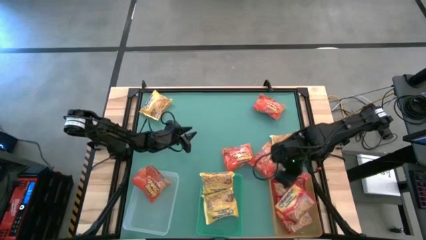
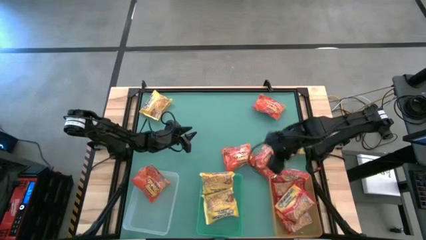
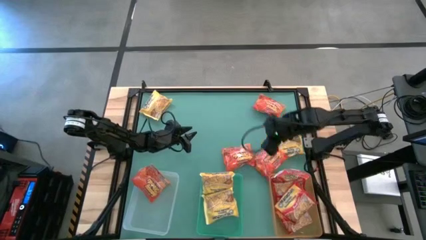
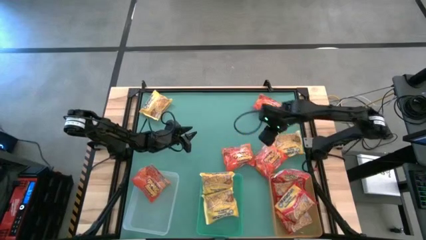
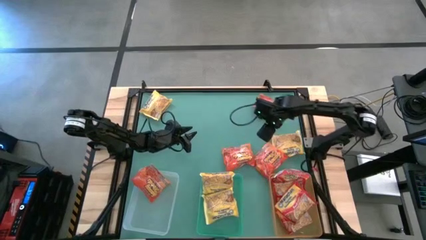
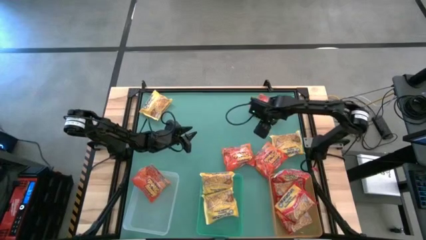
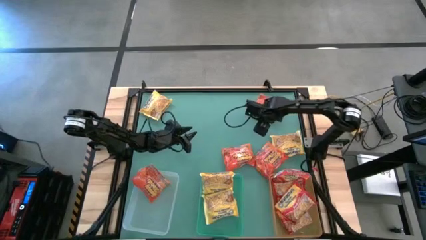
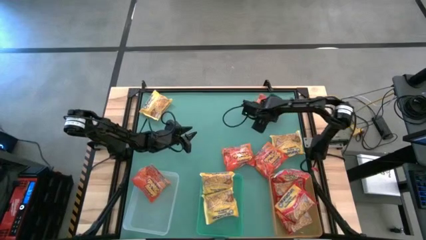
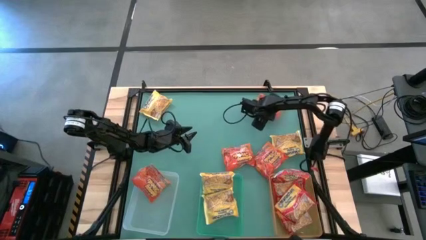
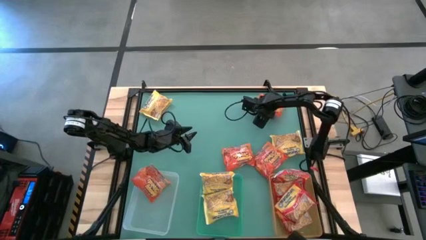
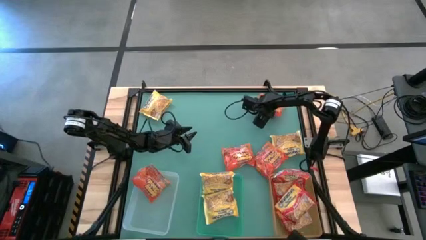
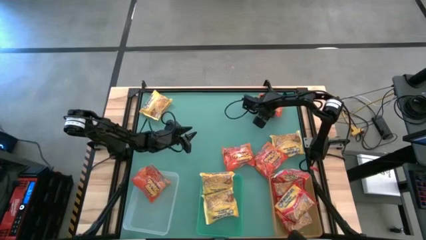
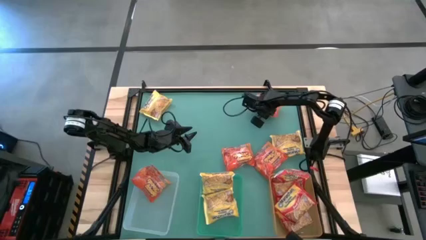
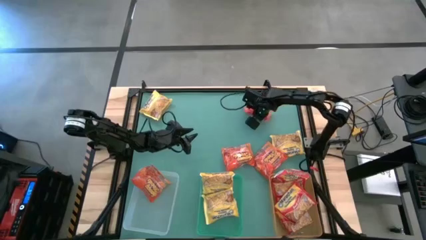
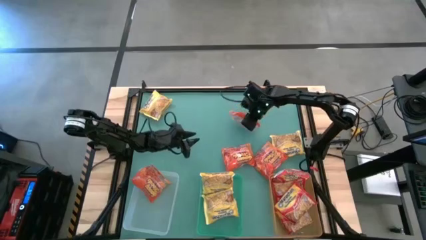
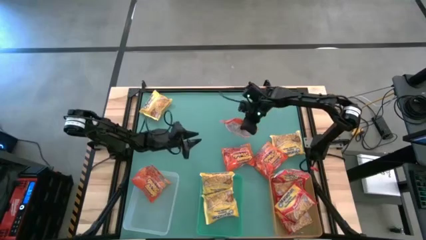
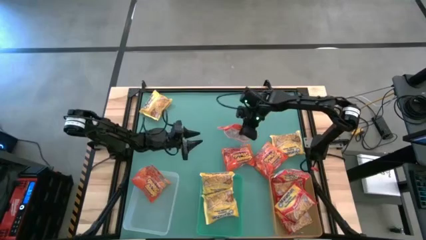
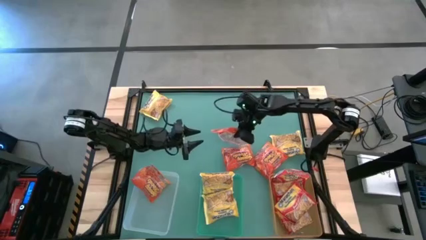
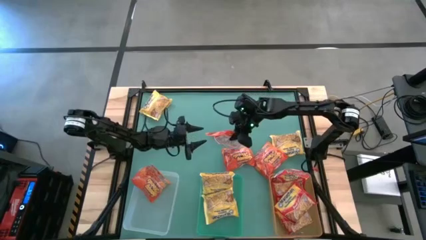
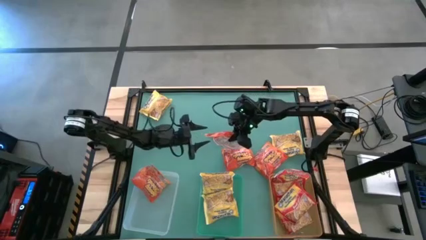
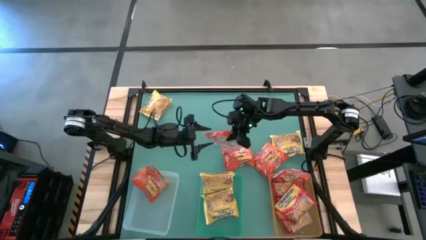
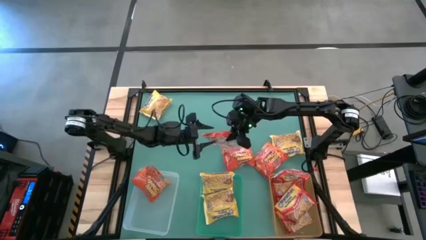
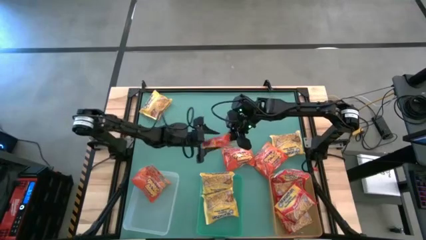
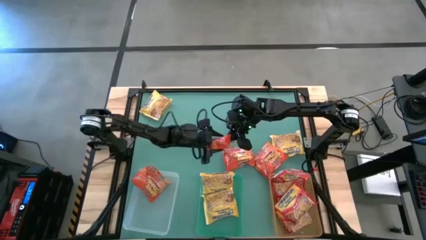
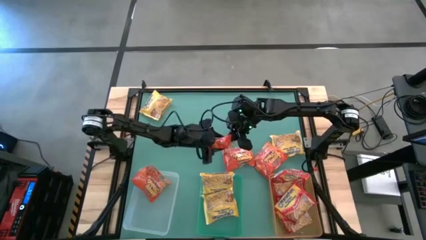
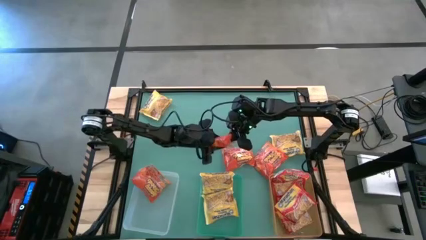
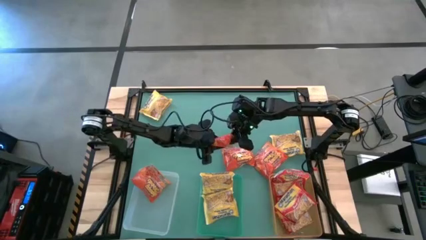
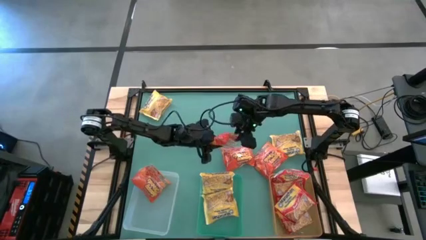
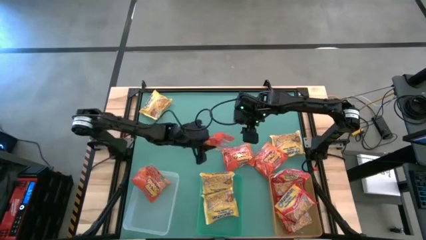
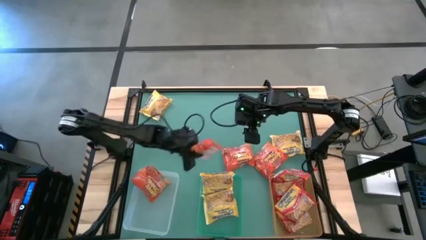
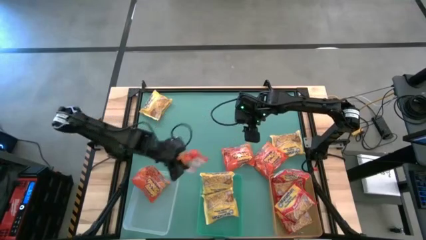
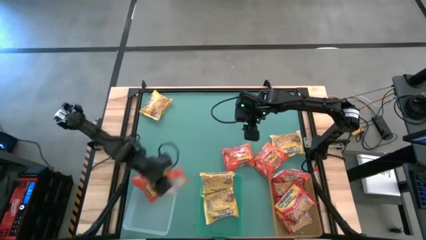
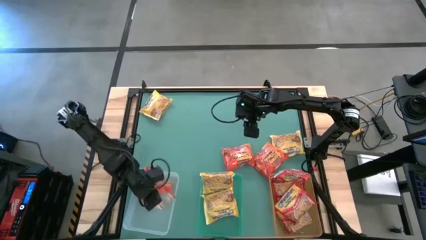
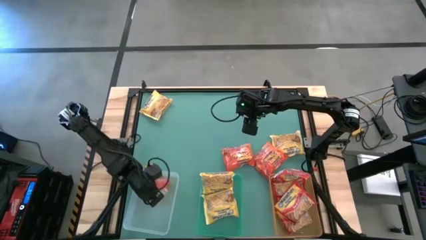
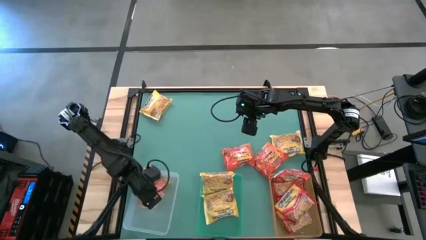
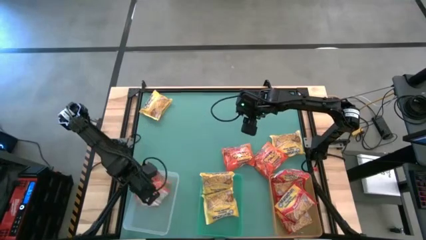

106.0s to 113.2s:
Task: Sort Maruchan noodles
Put the orange noodle pack into the white bin

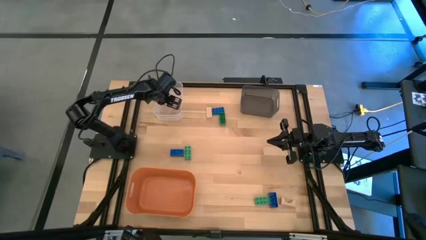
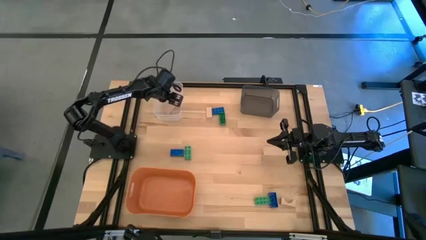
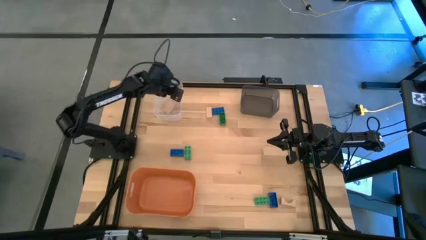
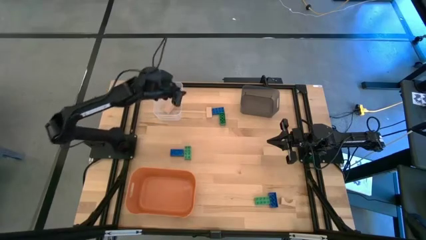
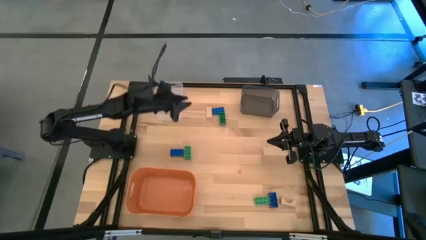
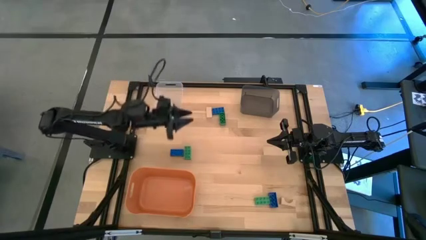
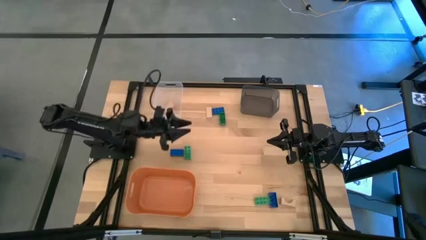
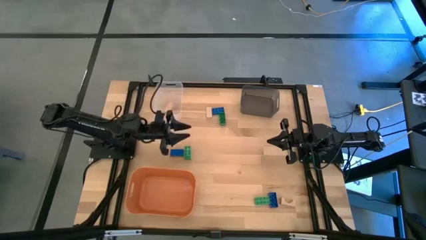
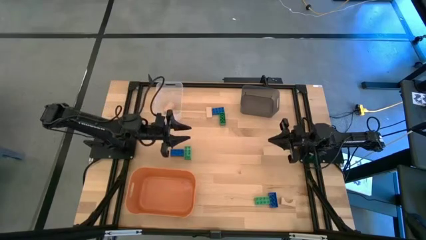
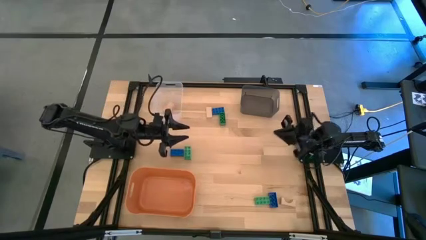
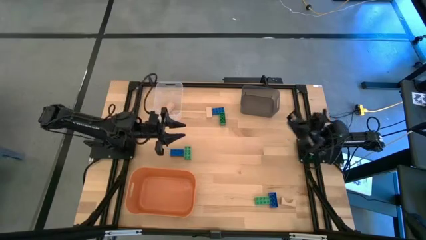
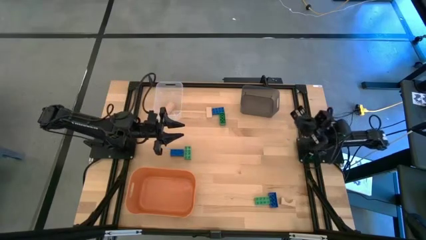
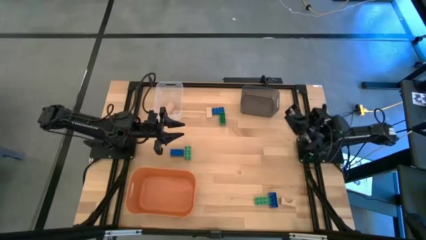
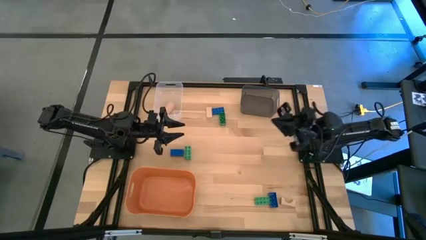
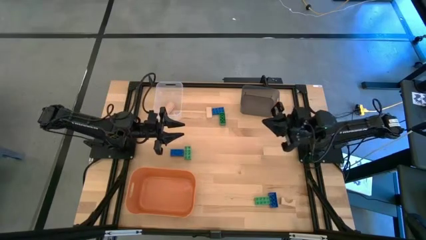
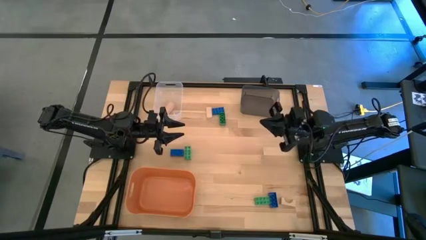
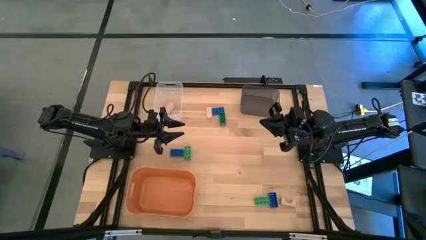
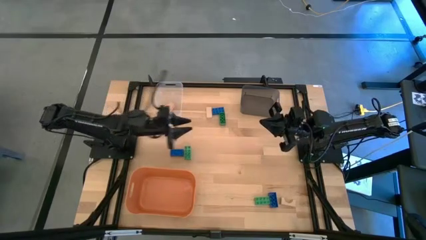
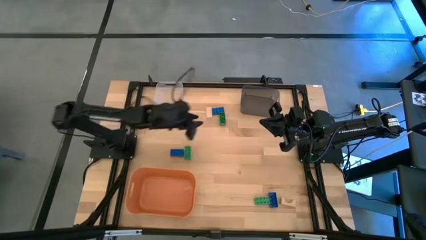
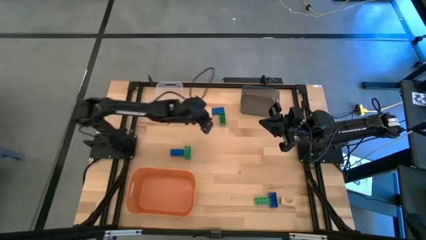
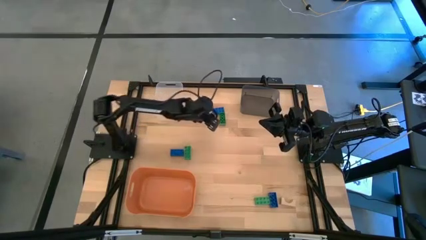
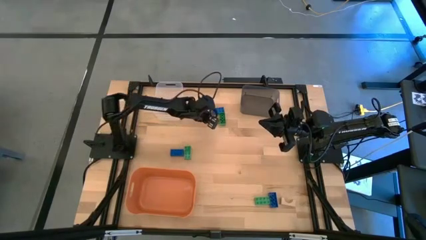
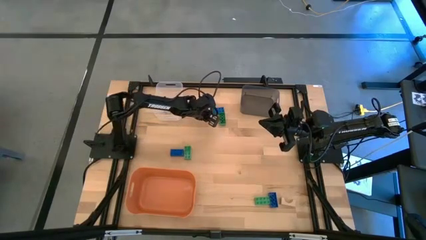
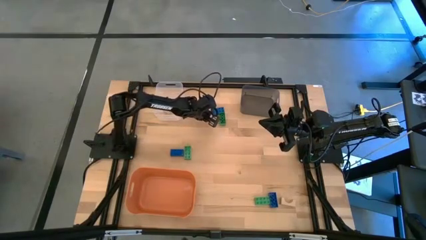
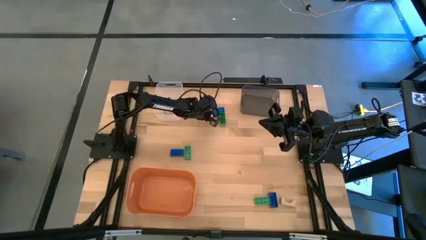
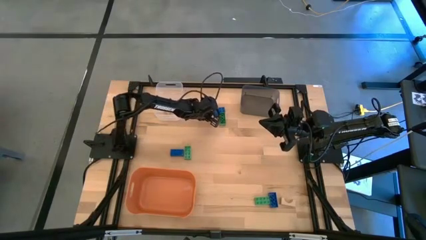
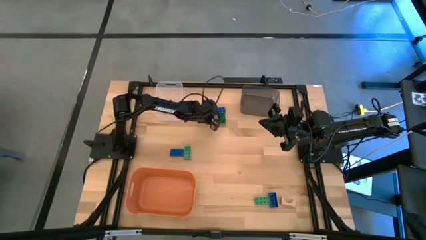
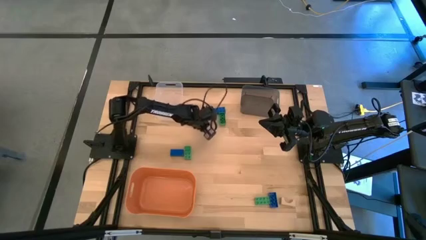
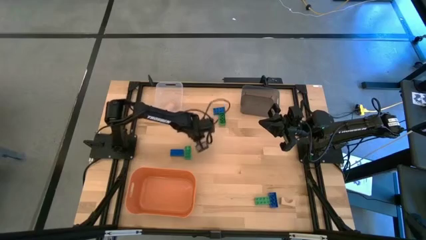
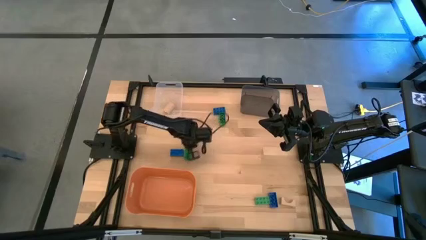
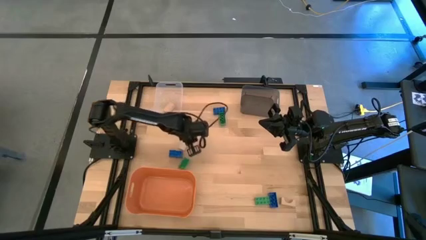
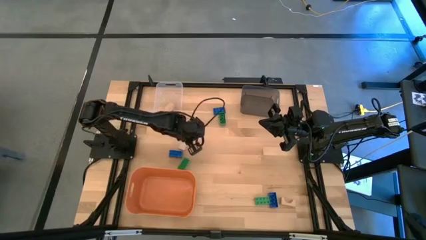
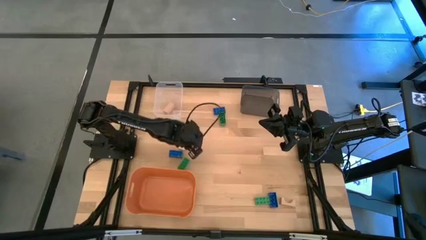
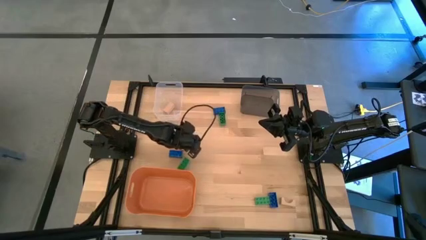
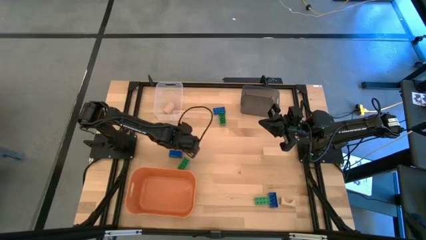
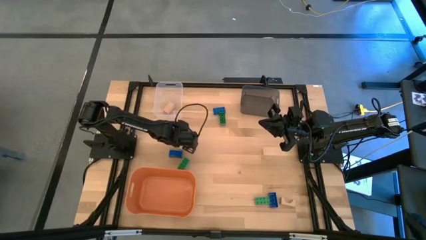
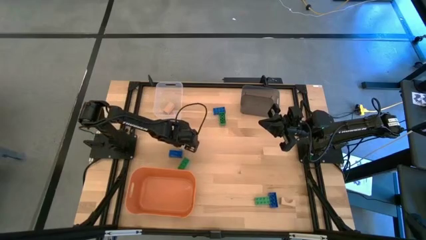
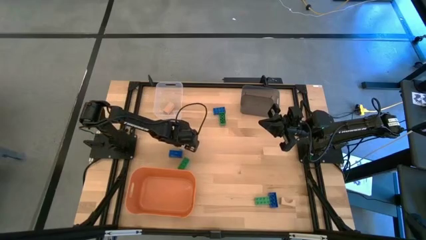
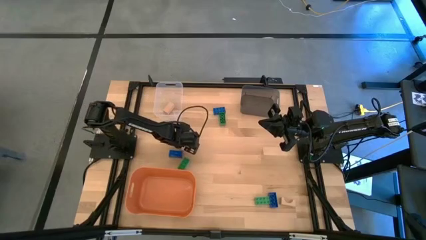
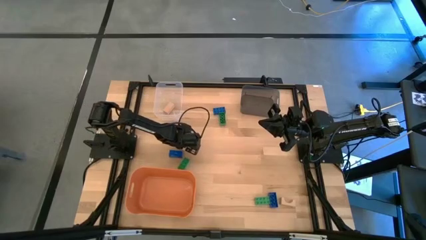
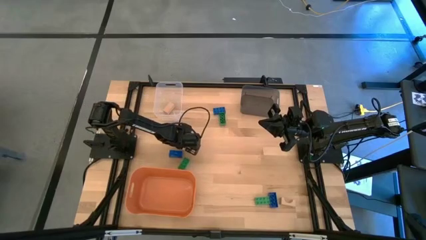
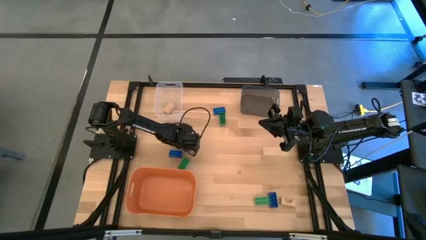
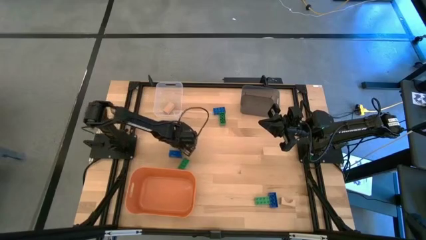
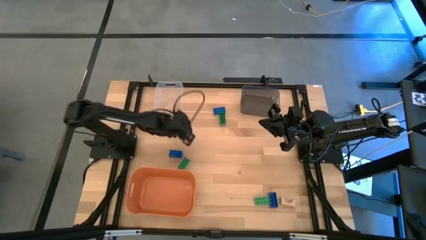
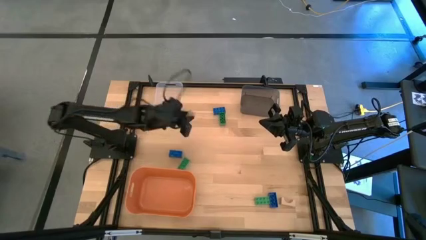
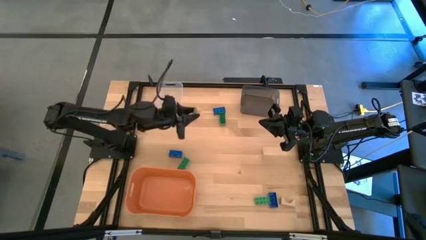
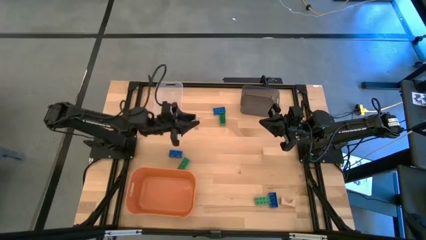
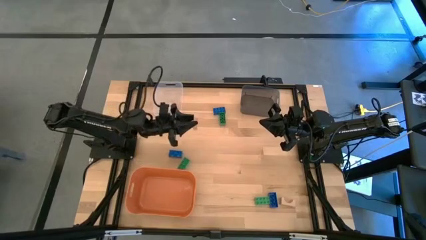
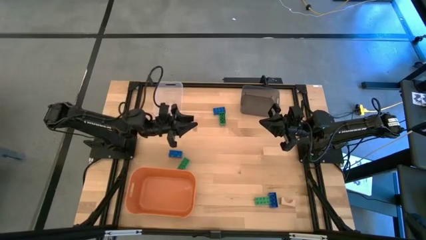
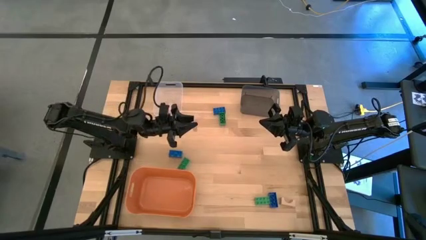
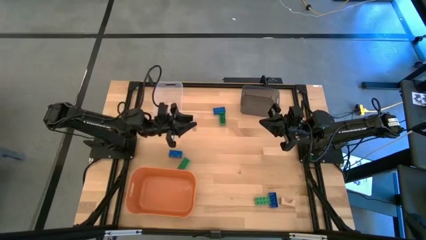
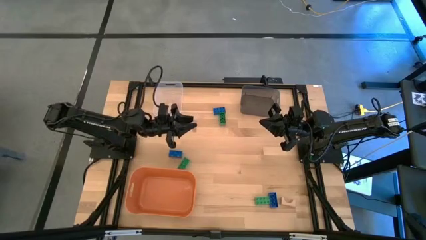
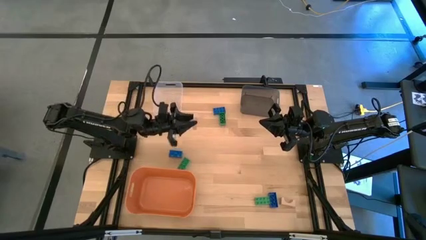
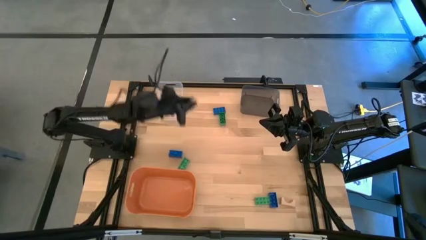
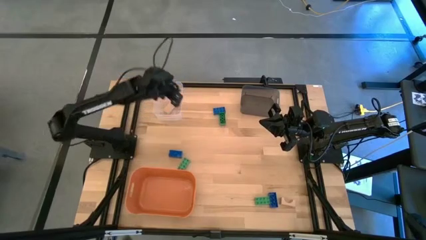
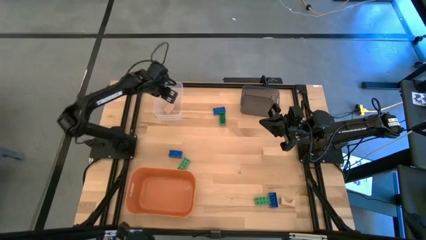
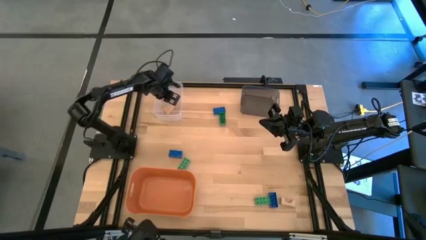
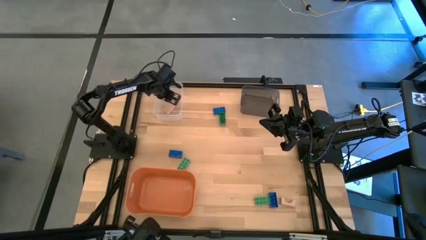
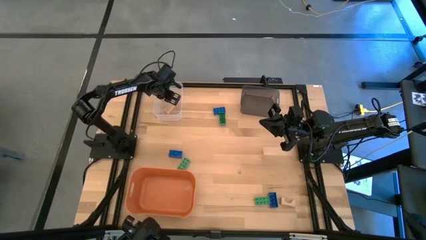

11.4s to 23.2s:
Task: Sort & place blocks by color
Put the top brown wooden block into the transparent bin
